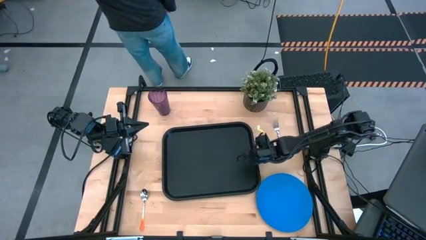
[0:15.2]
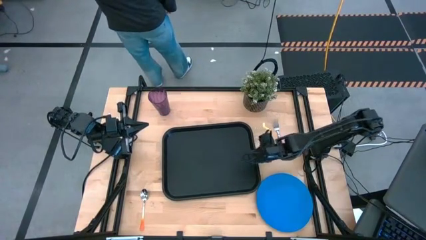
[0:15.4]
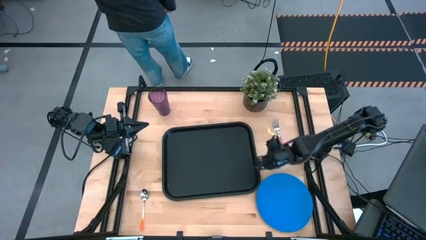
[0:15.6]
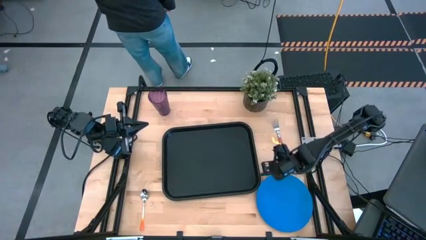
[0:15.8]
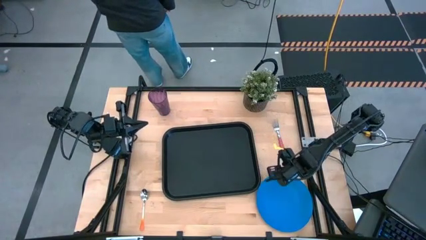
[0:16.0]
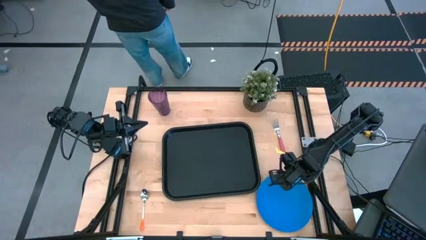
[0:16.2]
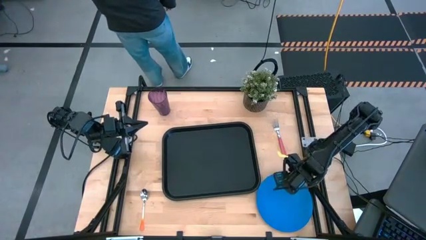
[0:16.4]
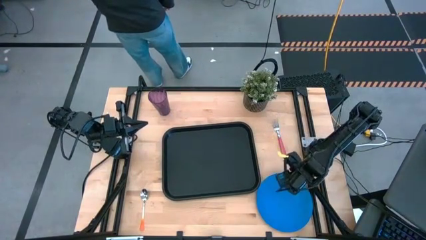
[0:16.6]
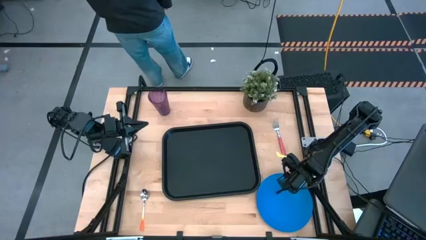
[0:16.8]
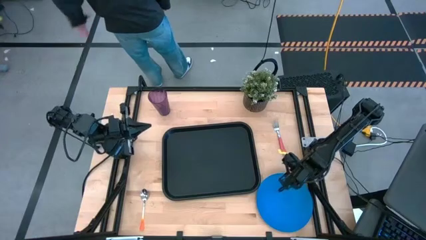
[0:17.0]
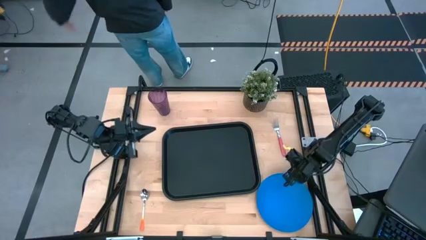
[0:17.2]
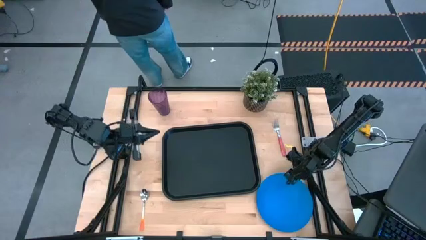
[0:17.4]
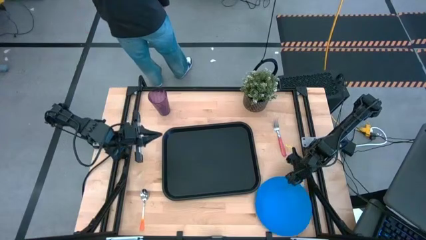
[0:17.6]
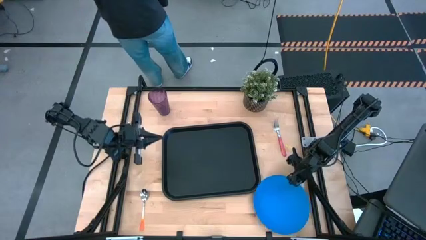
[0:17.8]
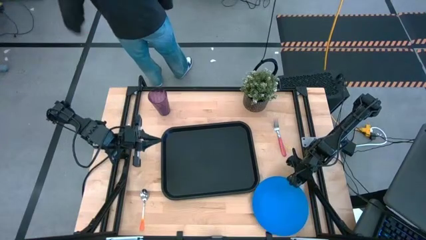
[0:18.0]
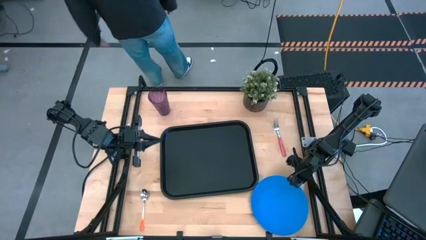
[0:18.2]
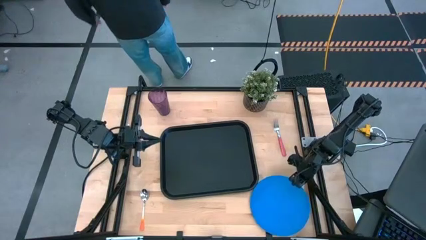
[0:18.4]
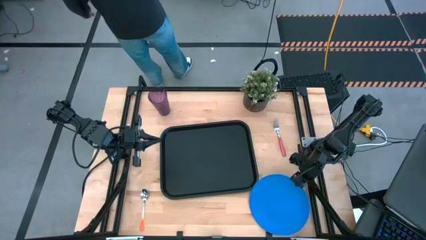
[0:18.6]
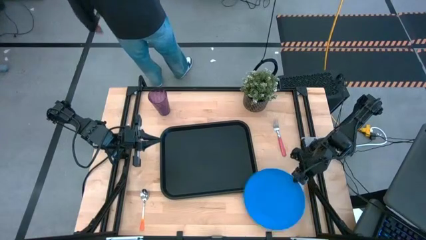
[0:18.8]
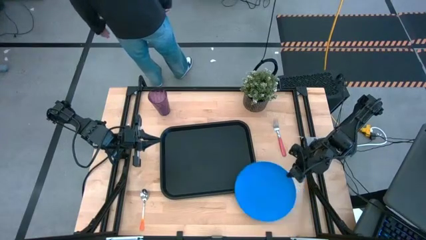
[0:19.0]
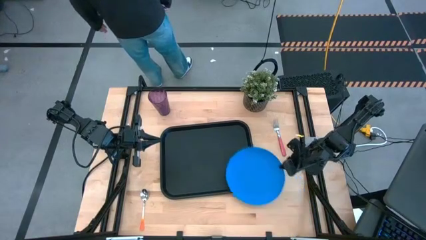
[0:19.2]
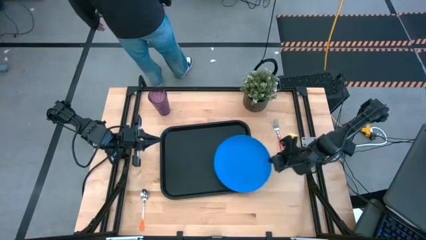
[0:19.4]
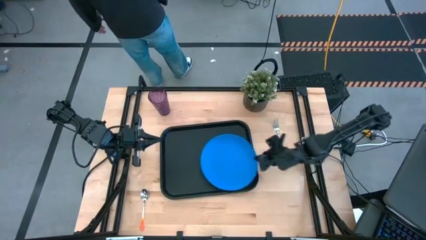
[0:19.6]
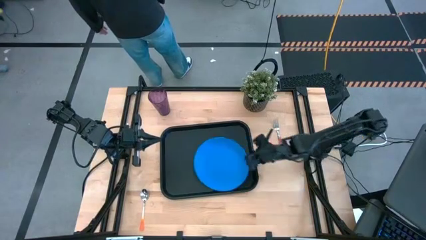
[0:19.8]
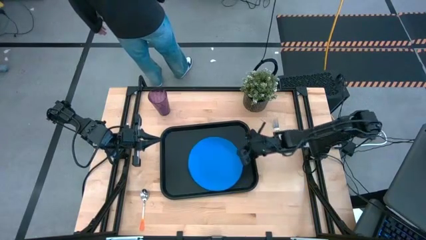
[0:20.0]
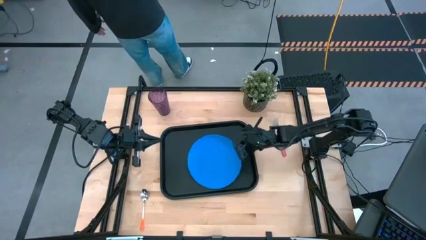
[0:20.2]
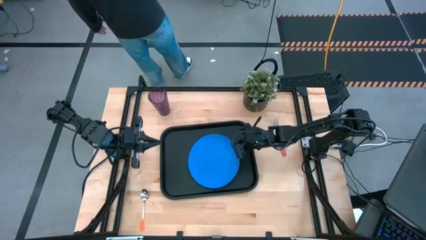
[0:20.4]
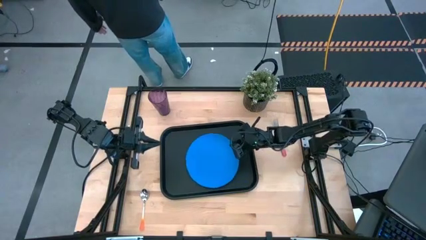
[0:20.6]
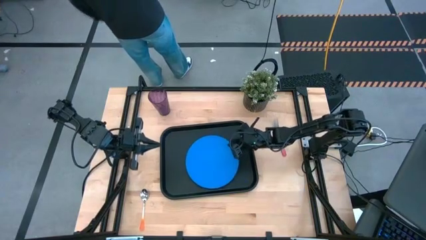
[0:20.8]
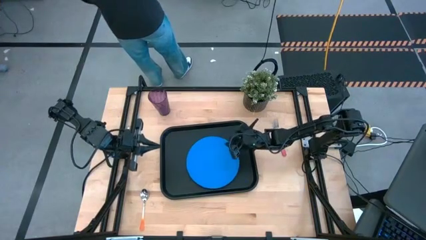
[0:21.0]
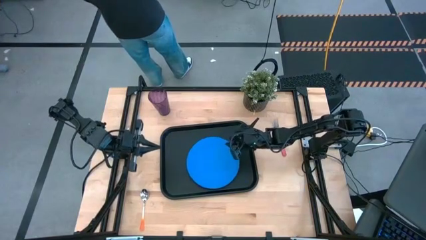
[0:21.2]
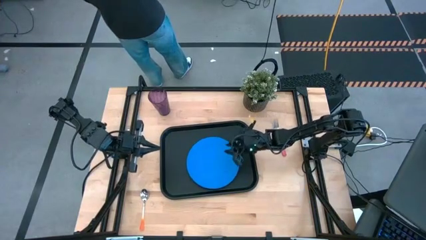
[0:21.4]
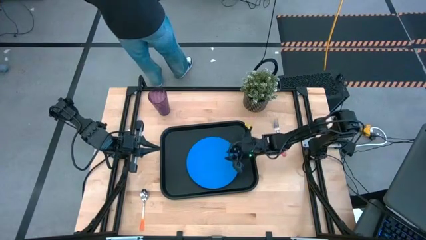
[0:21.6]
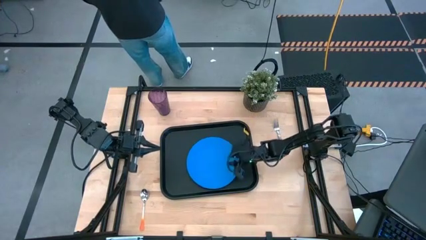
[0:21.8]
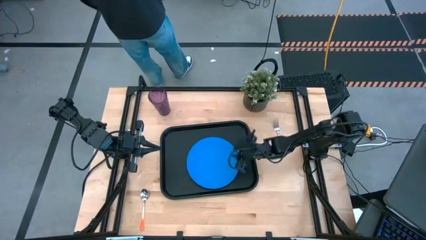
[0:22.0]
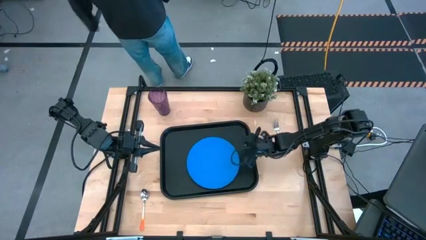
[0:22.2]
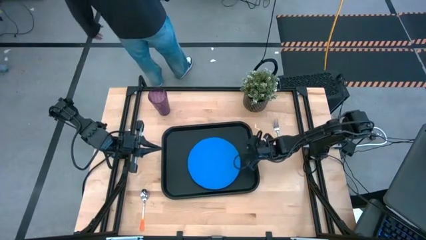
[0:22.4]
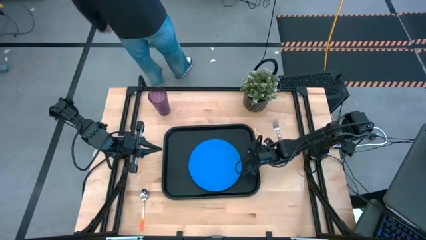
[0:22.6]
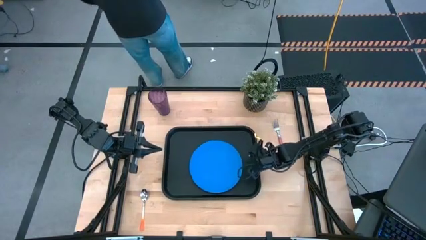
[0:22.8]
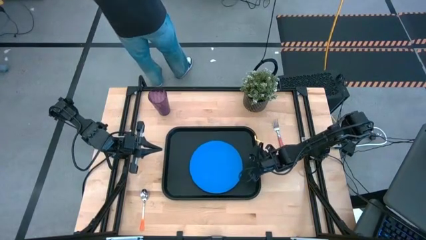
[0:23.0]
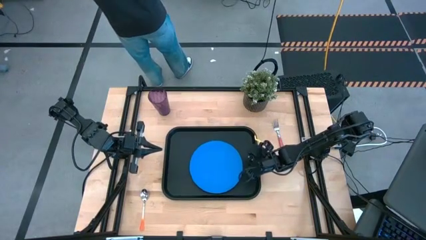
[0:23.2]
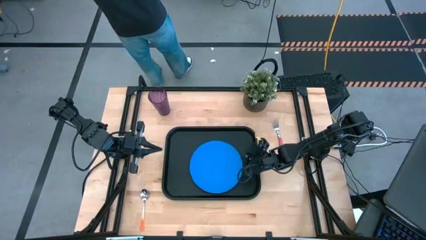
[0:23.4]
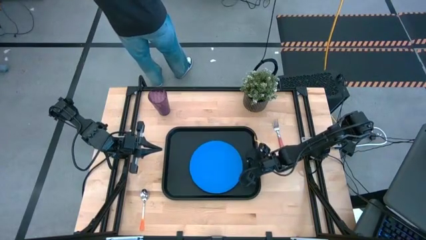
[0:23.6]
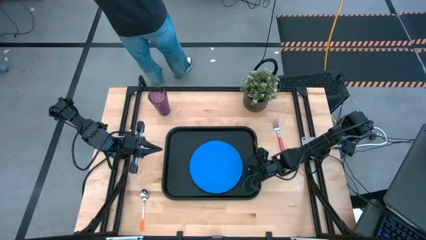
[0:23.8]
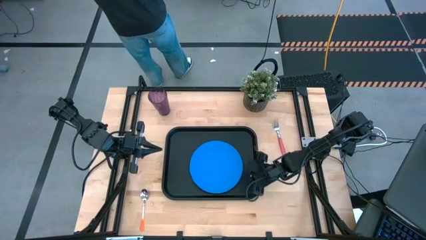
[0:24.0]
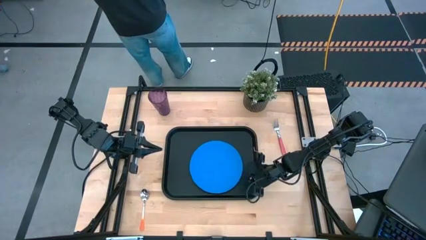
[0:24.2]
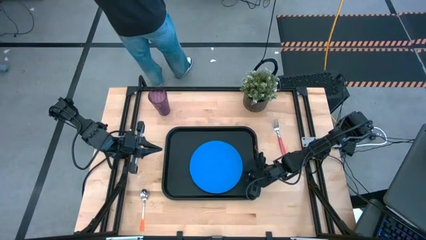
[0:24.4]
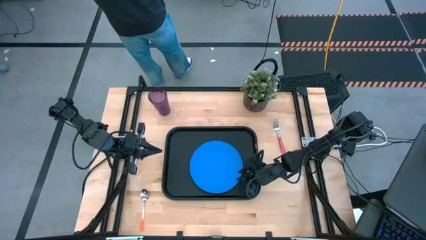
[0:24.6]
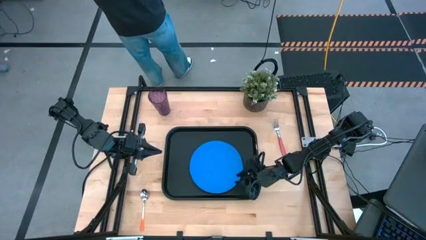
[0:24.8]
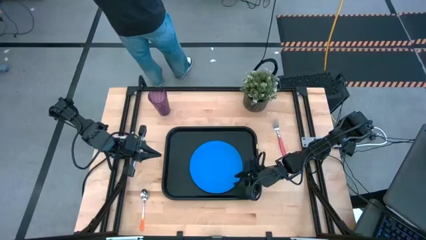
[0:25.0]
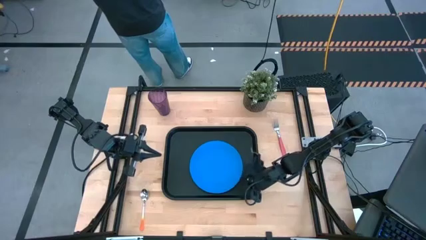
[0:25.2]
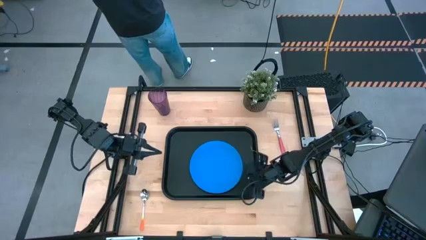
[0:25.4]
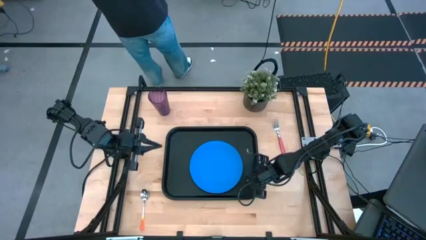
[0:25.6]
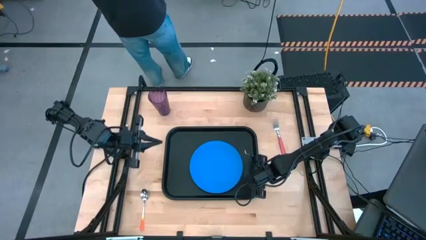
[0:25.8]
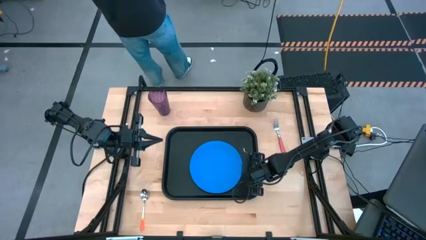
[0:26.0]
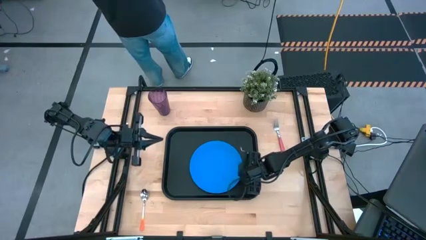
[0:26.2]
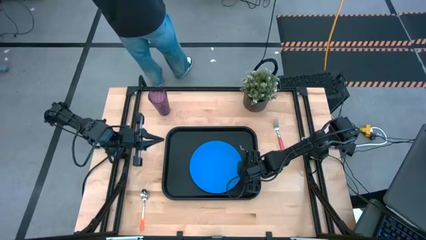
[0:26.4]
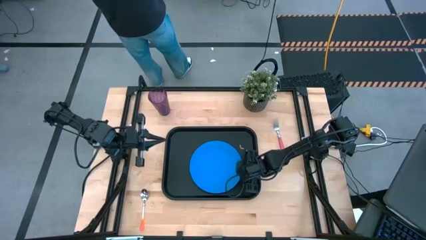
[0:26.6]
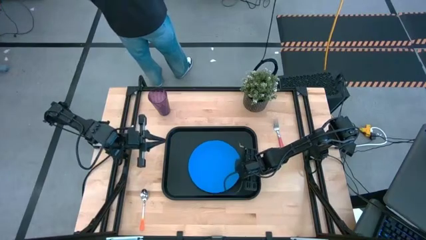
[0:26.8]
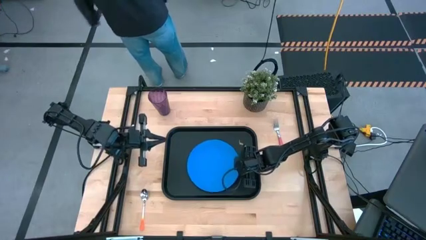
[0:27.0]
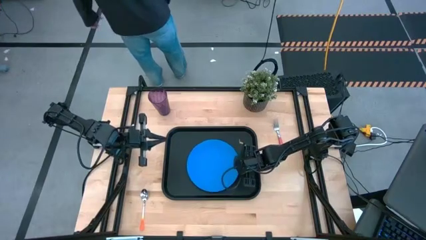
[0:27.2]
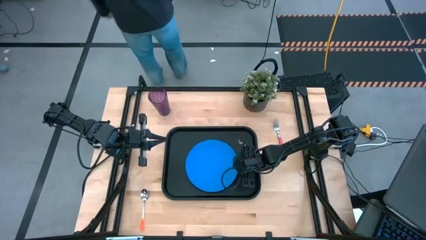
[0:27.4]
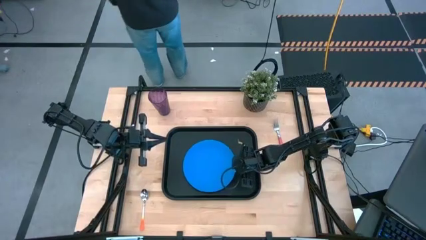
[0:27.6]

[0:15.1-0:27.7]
Task: Pick and place plate/cup/fork/spoon on tray
Put the blue plate on the black serving tray
